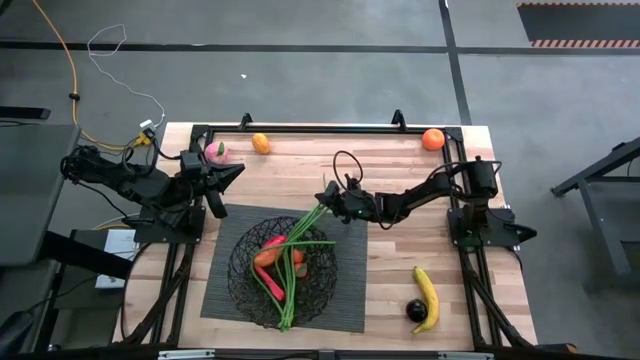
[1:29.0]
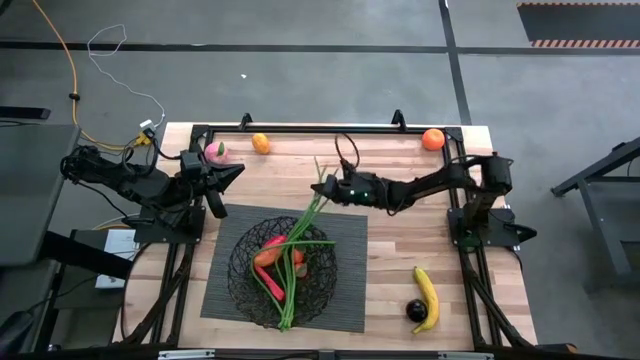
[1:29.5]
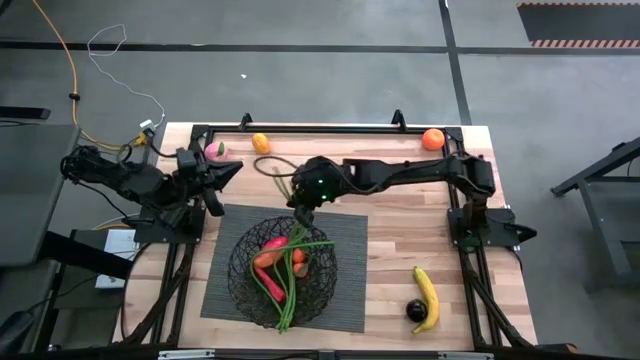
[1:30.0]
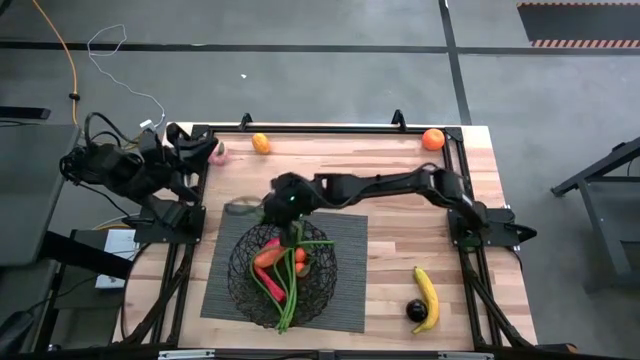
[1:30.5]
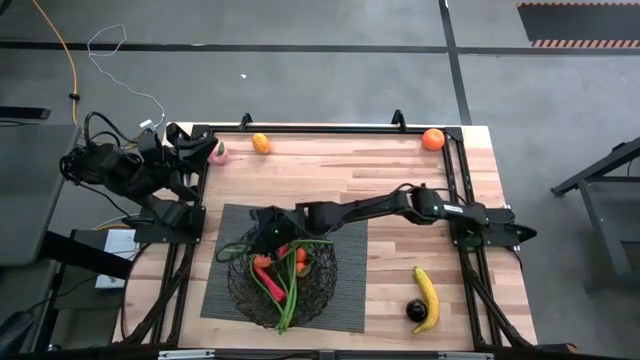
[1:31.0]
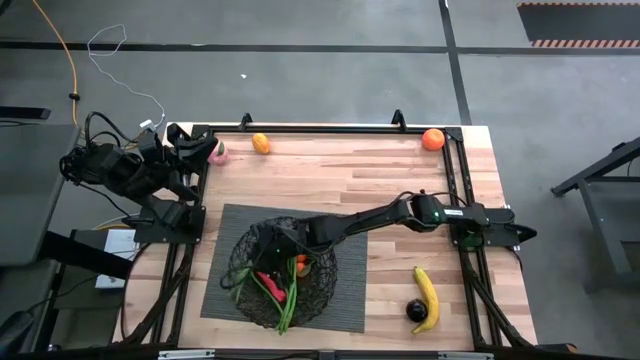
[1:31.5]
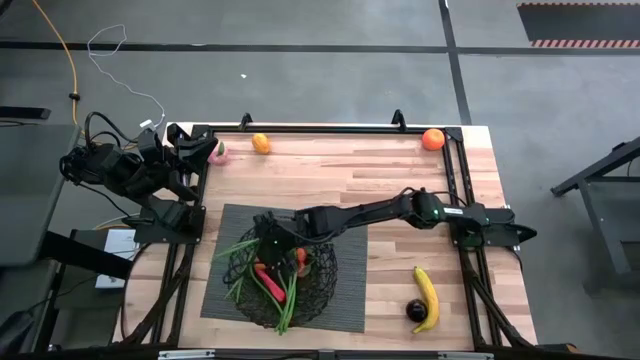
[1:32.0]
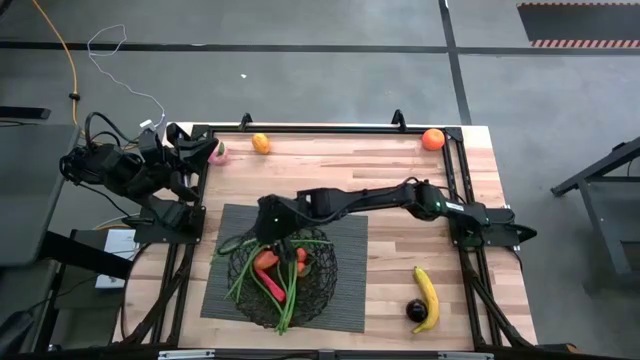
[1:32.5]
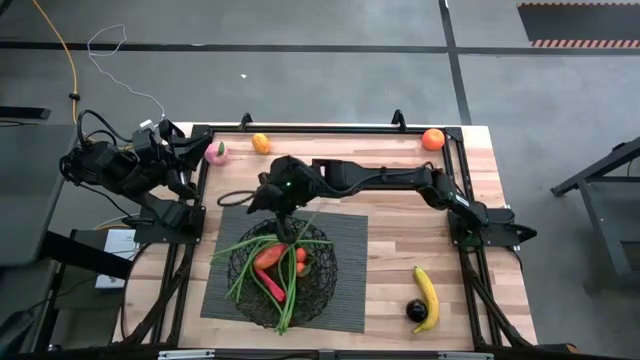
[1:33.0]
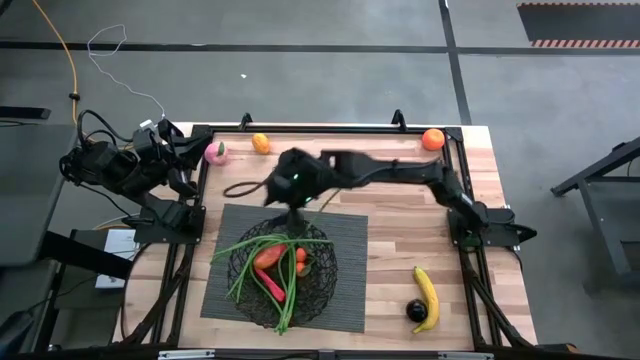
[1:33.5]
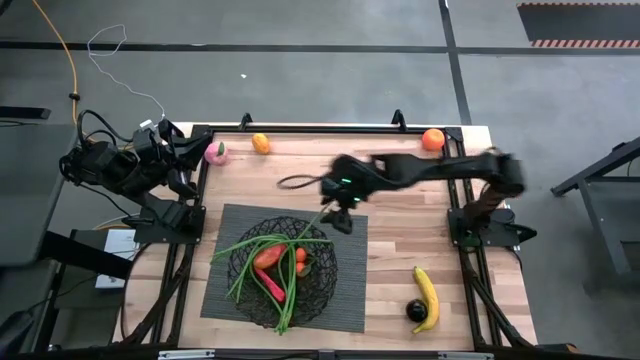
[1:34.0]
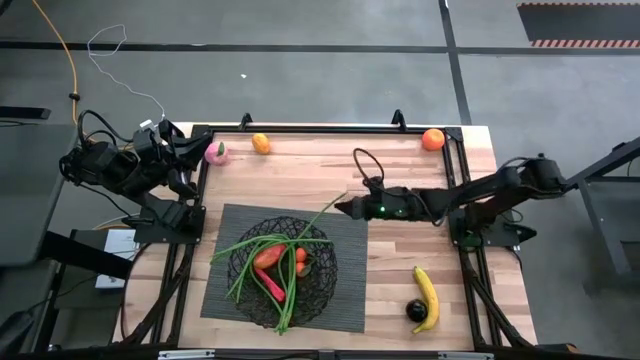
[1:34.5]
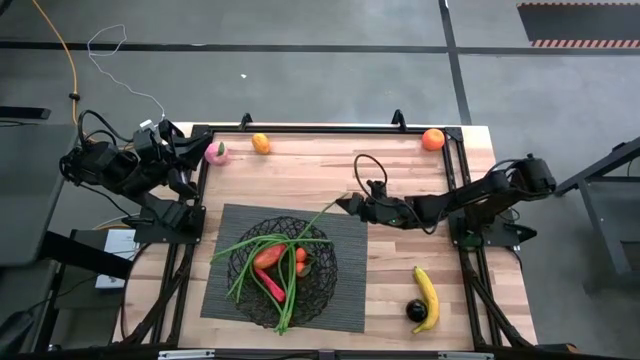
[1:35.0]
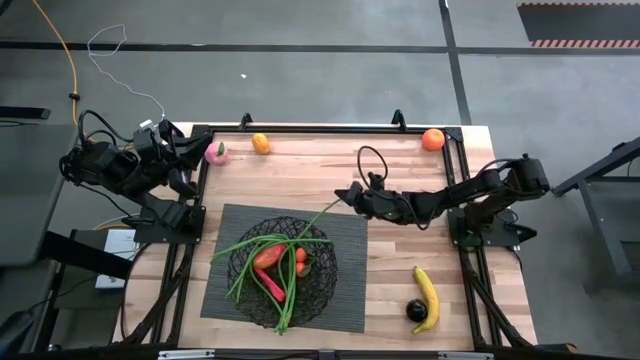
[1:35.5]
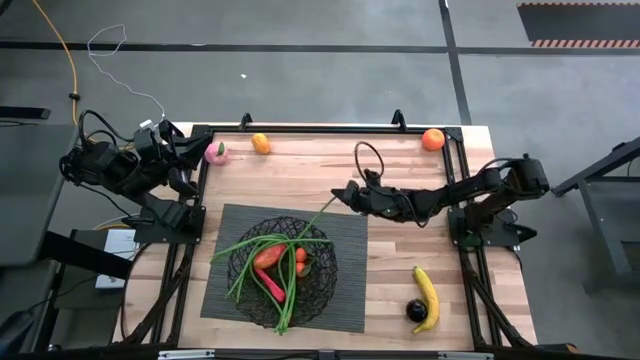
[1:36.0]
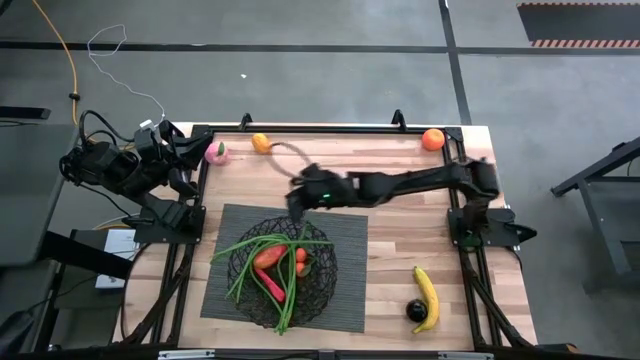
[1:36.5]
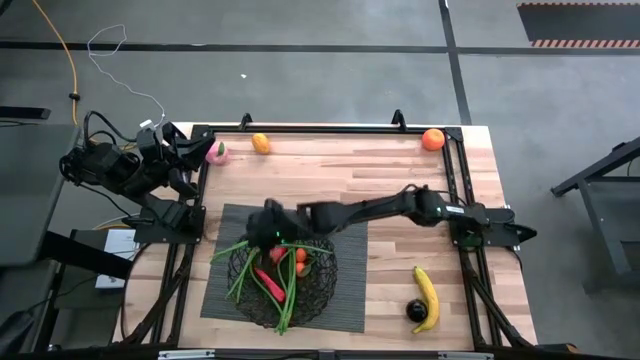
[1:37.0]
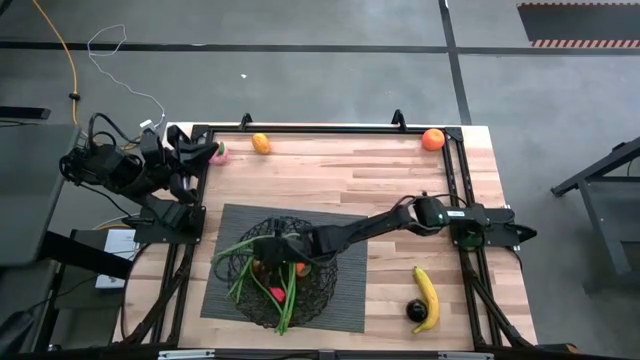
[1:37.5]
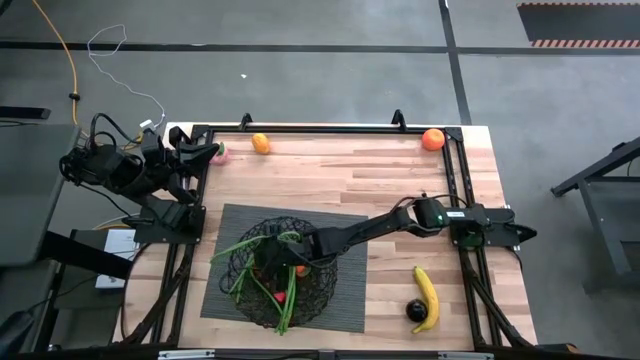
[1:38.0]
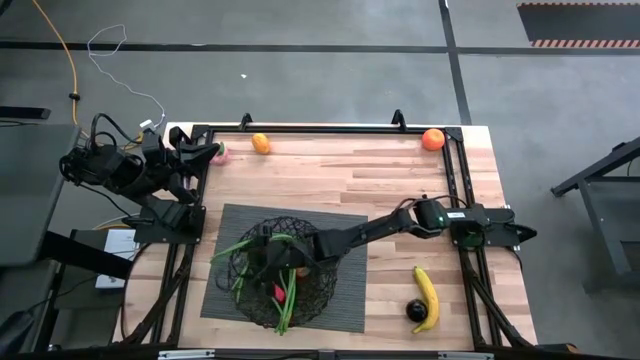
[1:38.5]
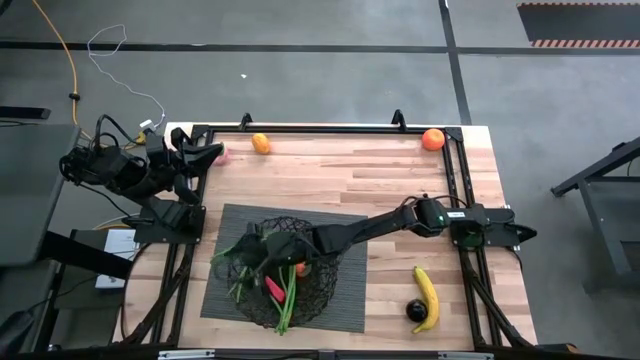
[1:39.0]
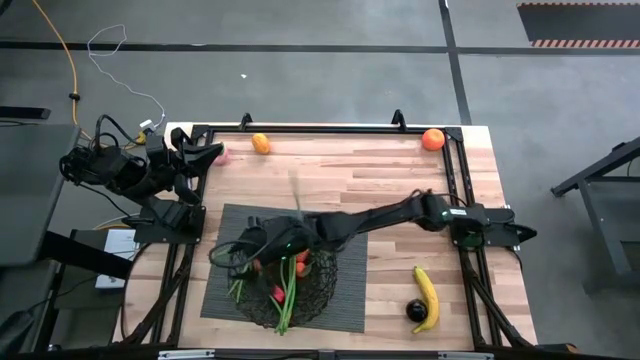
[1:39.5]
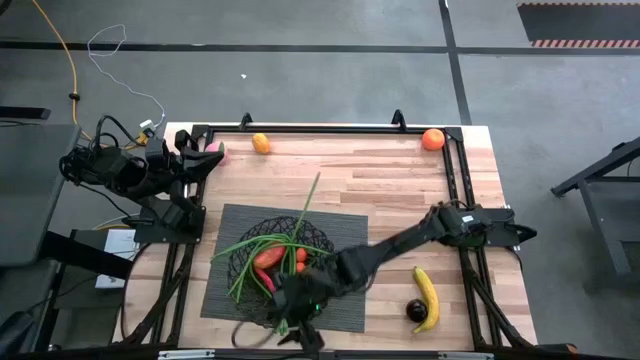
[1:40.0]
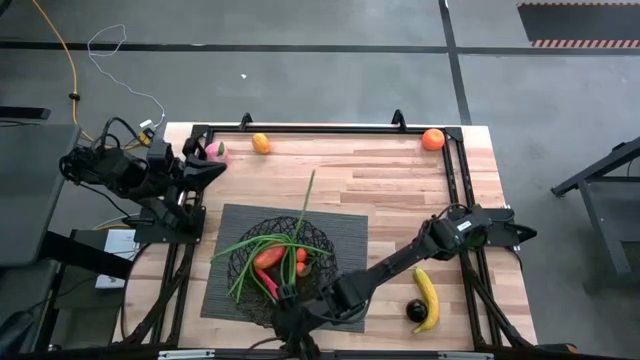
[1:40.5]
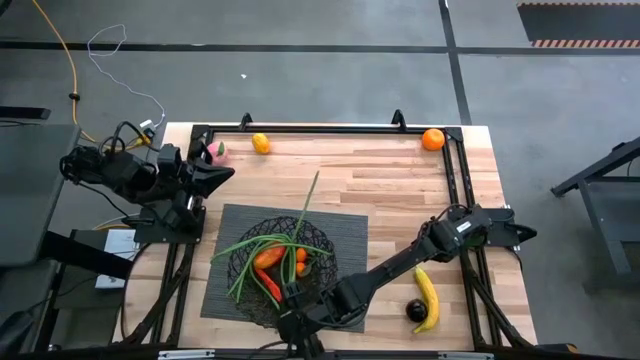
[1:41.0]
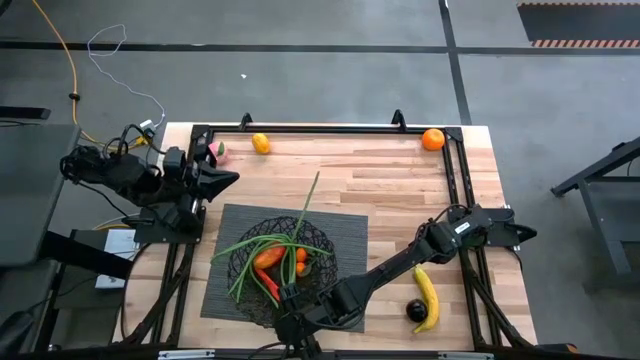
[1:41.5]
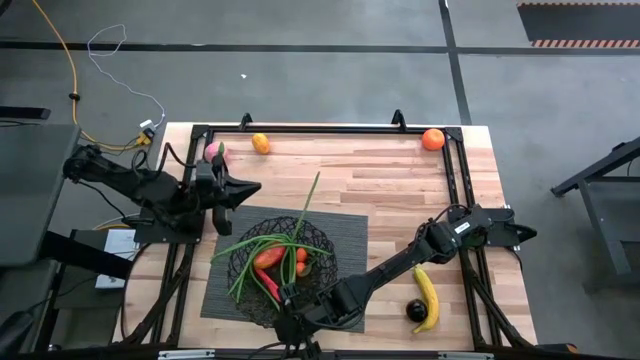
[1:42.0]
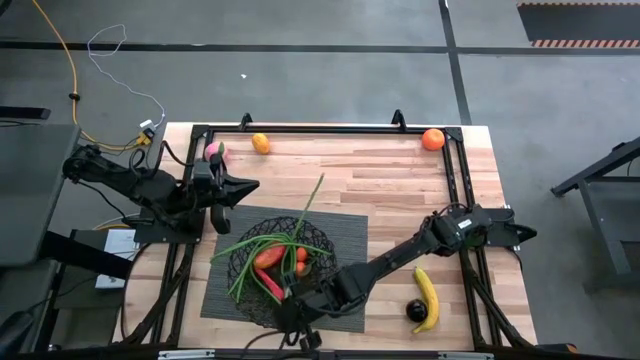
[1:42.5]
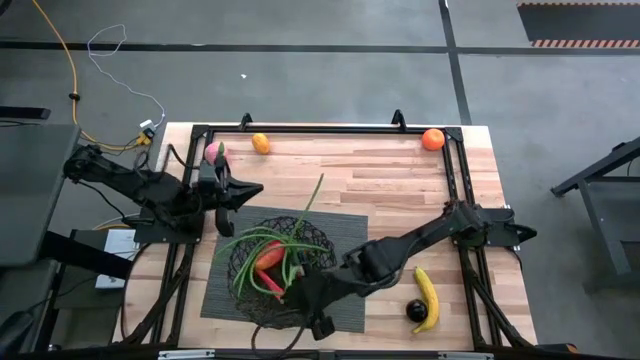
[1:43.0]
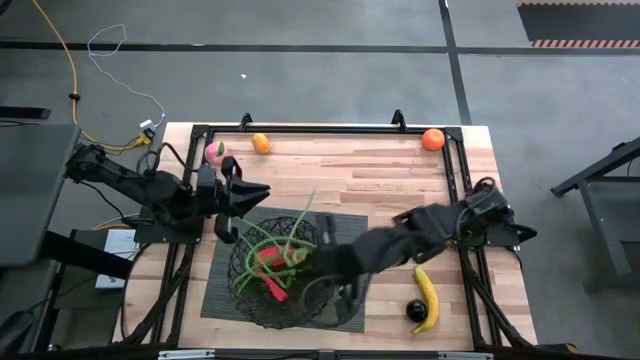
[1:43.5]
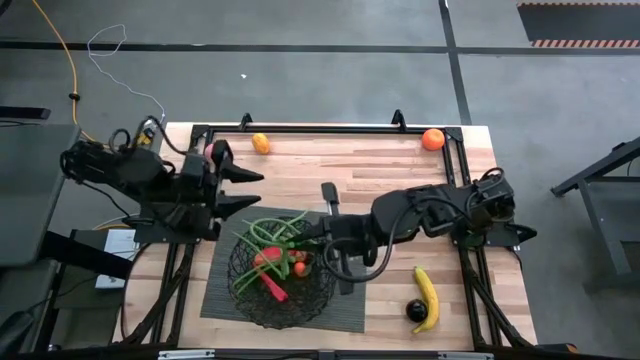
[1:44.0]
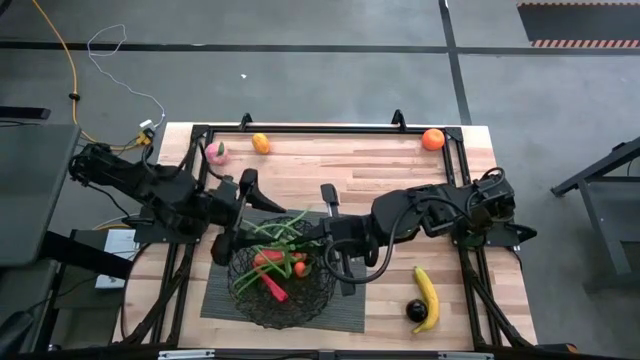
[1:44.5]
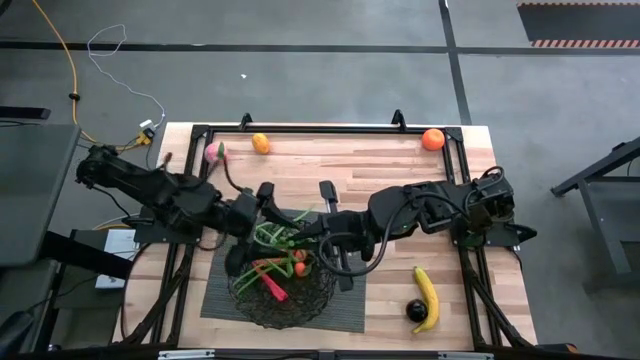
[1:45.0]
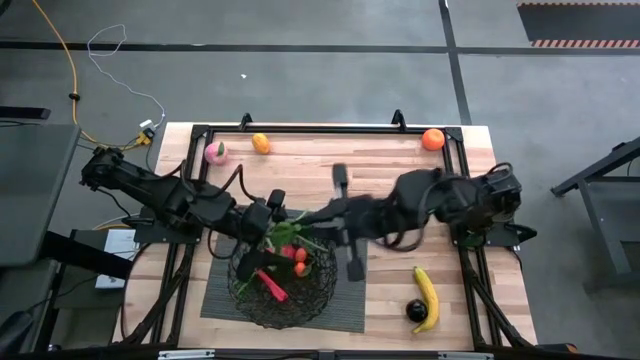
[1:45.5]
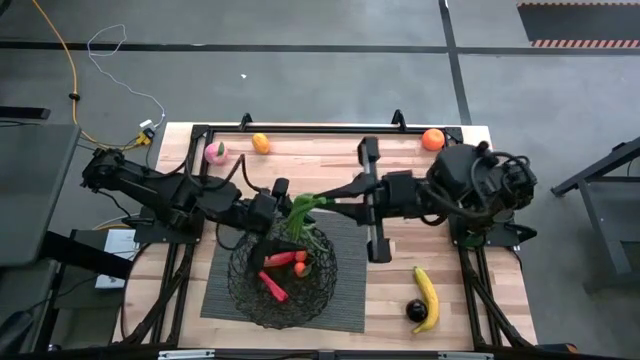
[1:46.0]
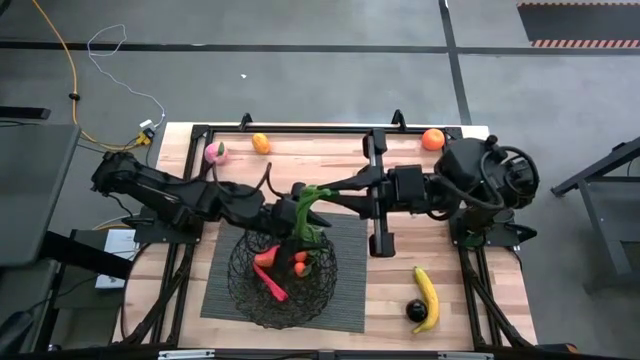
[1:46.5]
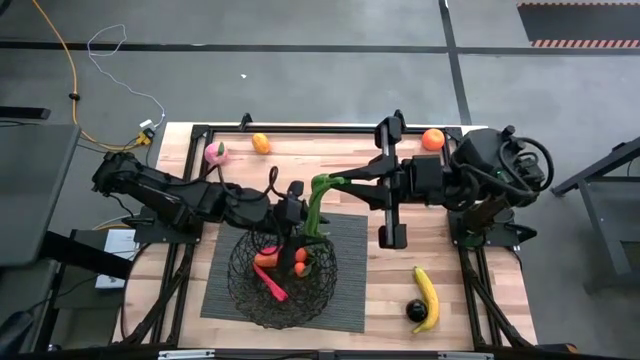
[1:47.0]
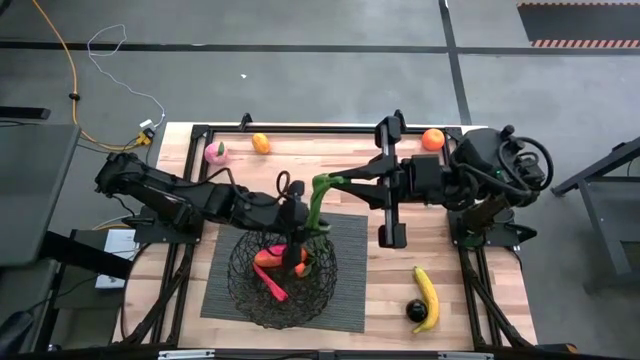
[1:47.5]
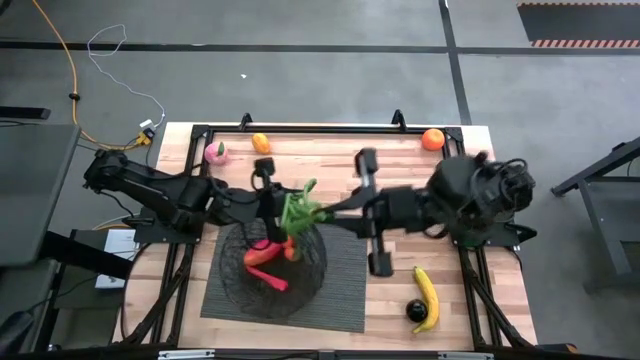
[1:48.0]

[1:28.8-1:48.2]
Task: Build produce basket
Put the green string beans into the black wire basket

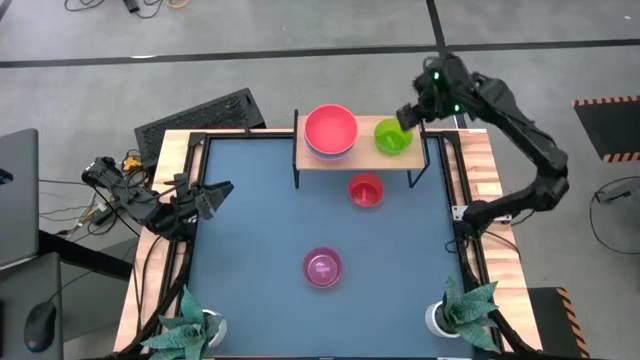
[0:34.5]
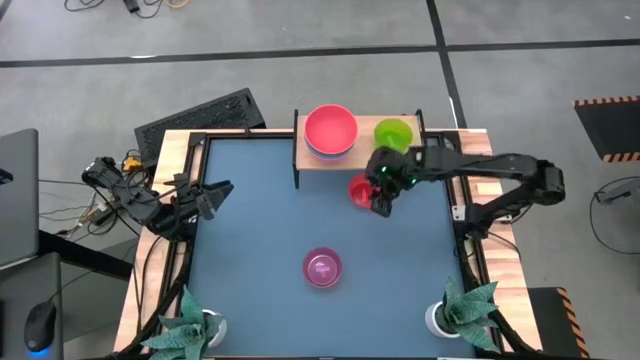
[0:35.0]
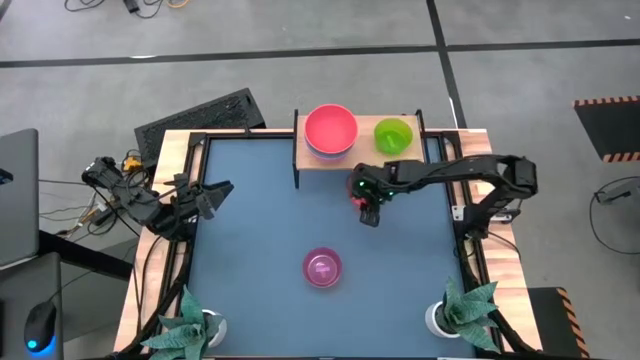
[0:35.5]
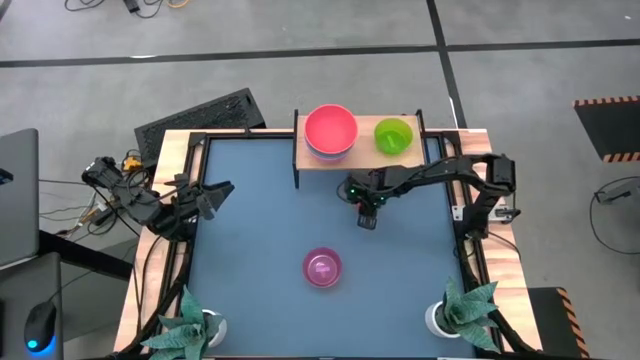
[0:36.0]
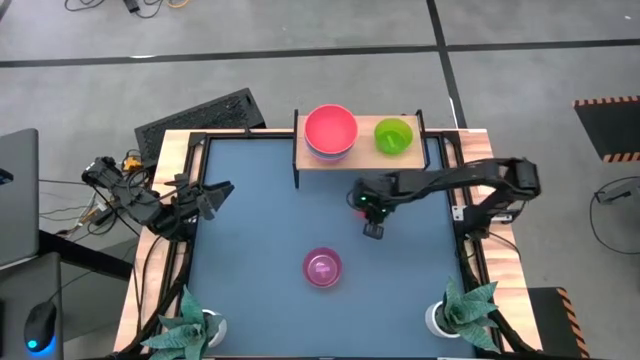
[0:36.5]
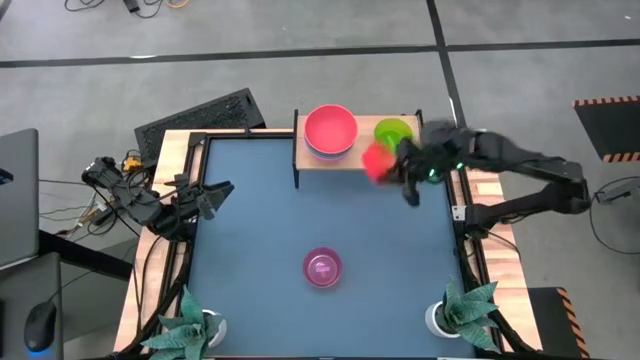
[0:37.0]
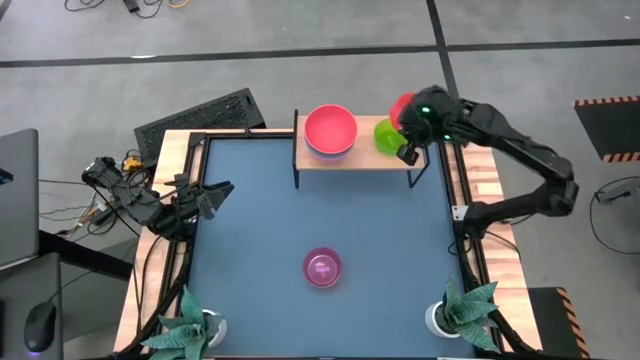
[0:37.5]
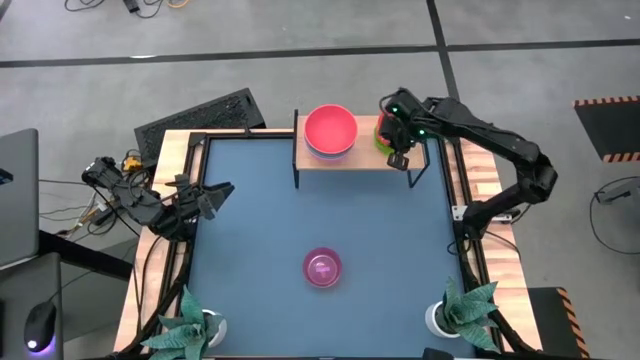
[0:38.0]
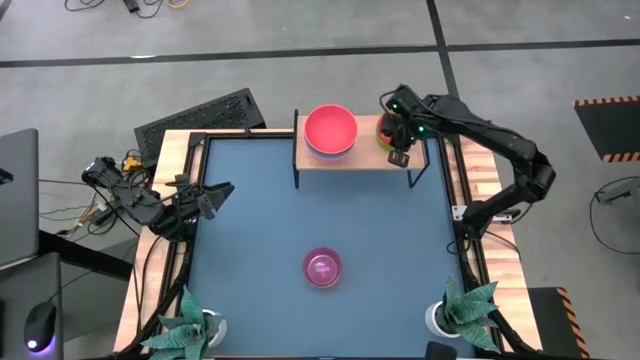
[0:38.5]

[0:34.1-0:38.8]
Task: Place and stack bowls onto a shelf
Stack the small orange bowl on the small green bowl on the shelf
